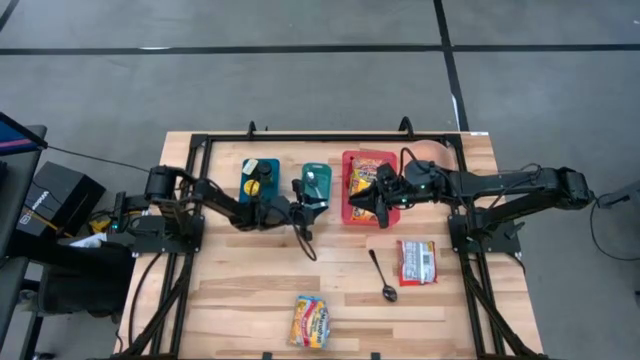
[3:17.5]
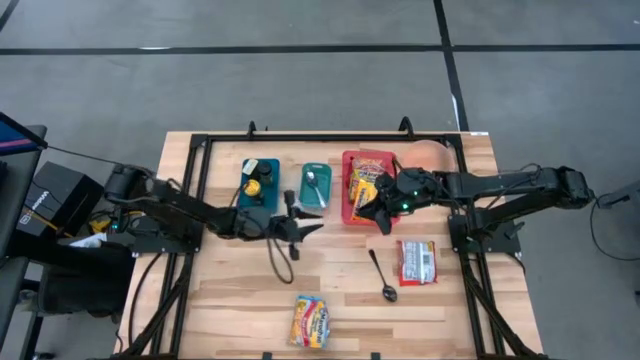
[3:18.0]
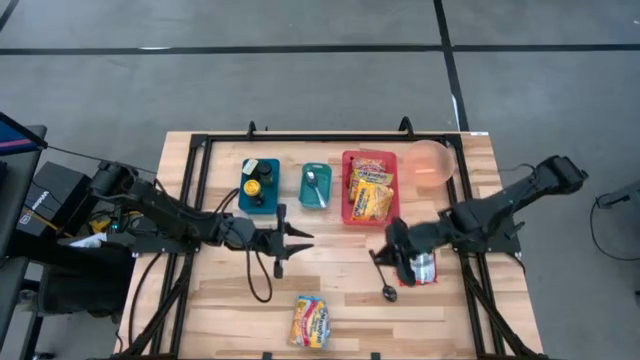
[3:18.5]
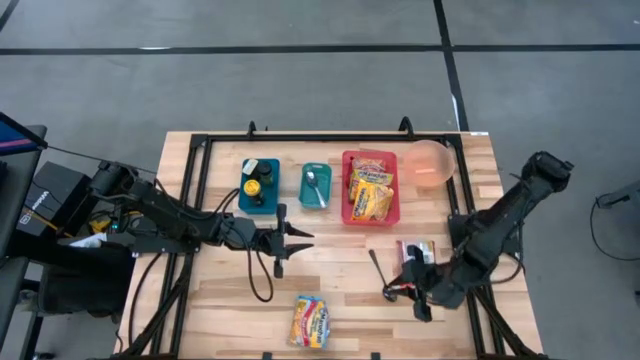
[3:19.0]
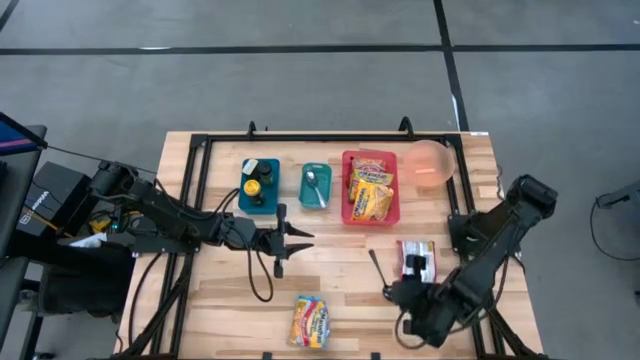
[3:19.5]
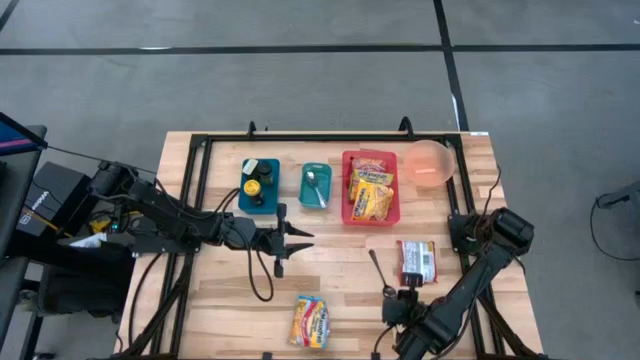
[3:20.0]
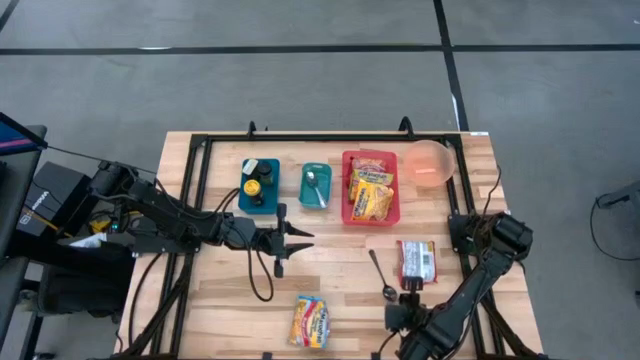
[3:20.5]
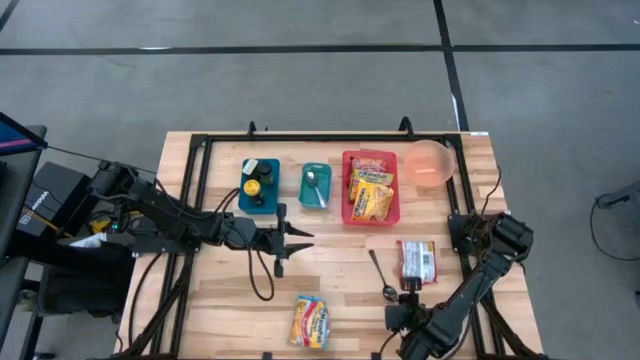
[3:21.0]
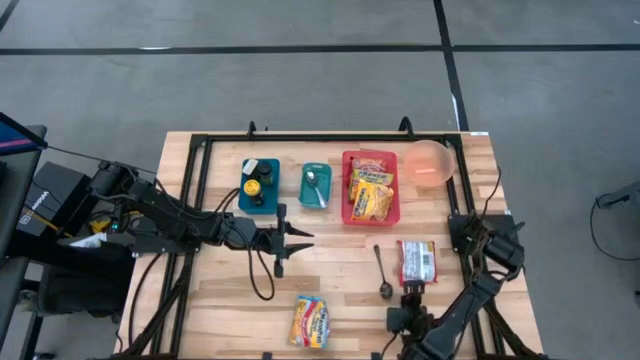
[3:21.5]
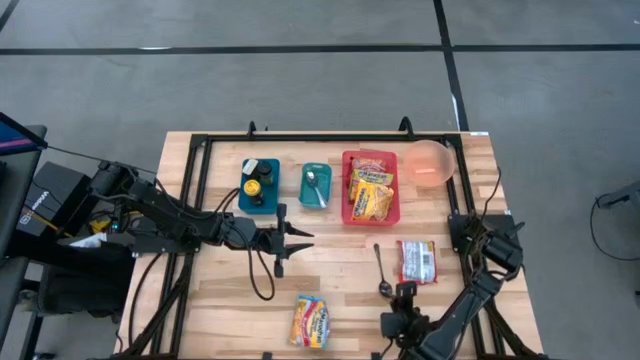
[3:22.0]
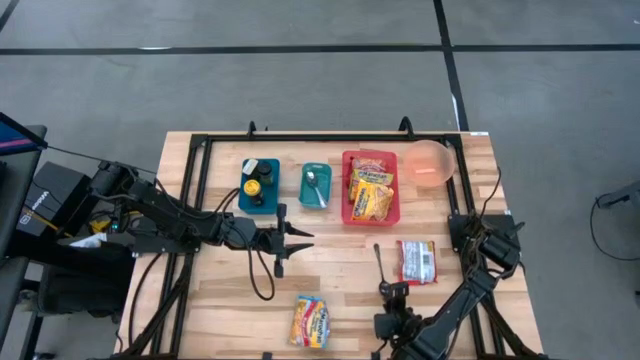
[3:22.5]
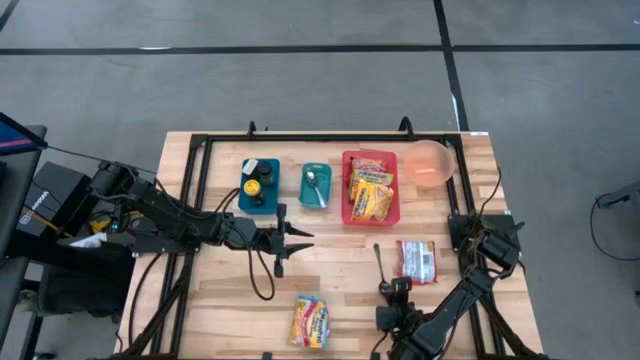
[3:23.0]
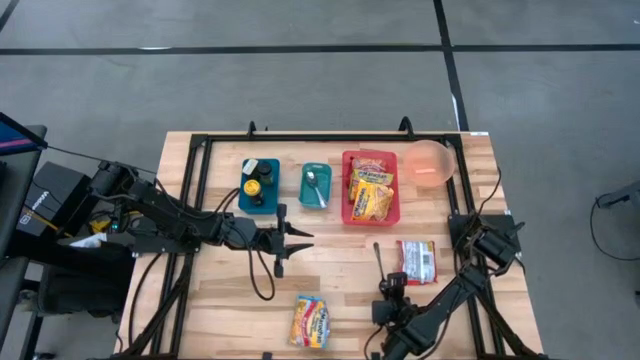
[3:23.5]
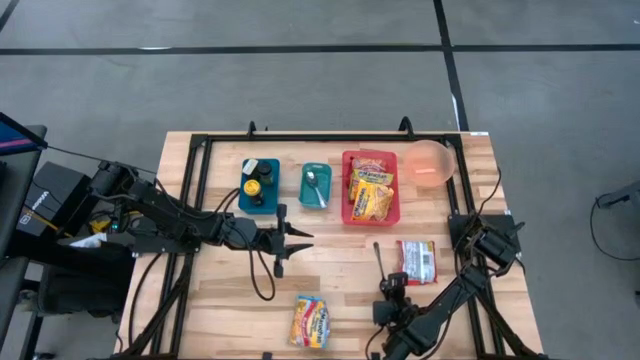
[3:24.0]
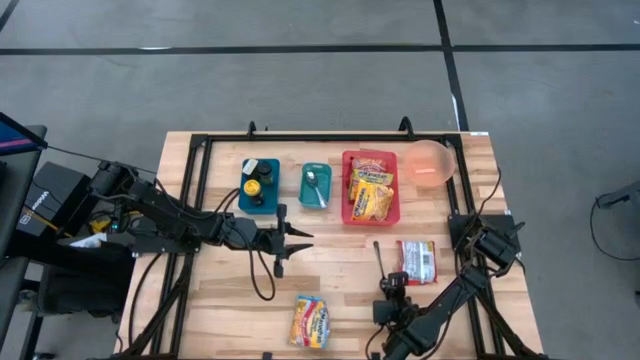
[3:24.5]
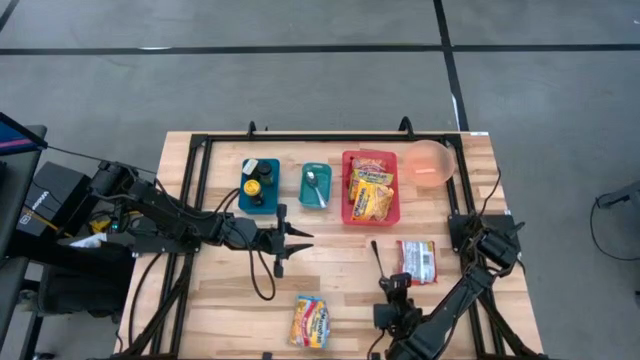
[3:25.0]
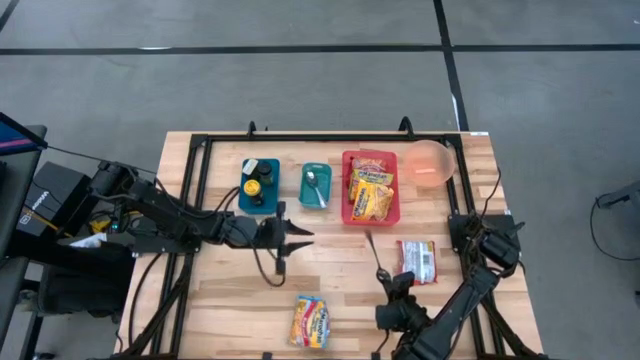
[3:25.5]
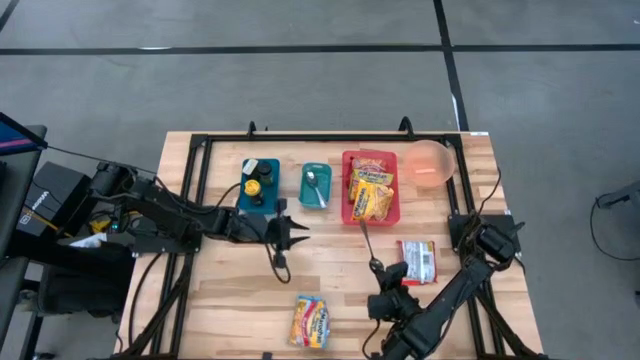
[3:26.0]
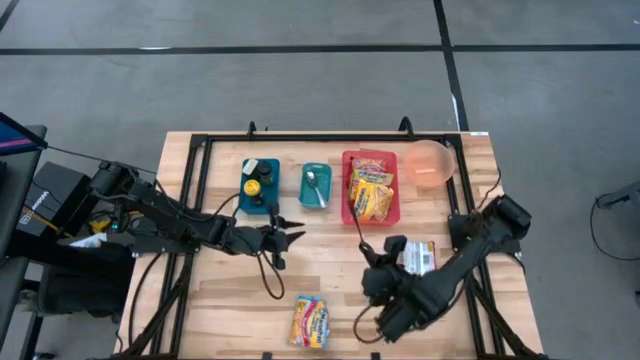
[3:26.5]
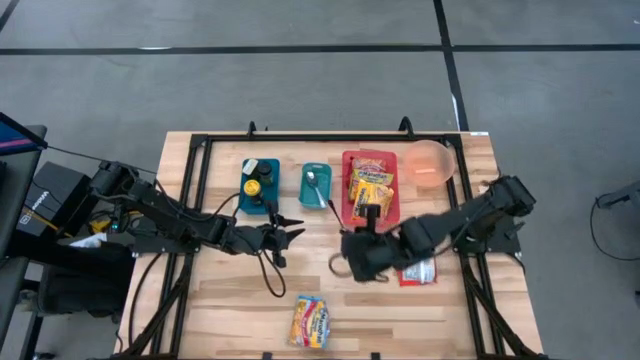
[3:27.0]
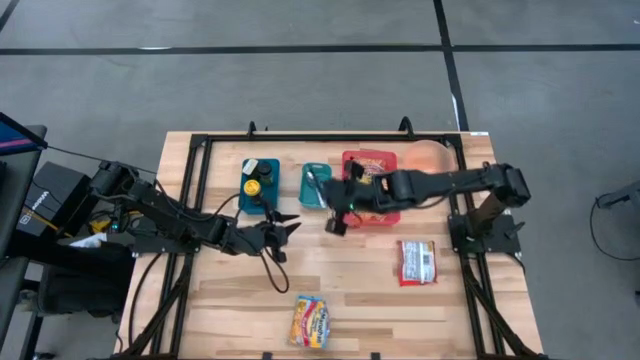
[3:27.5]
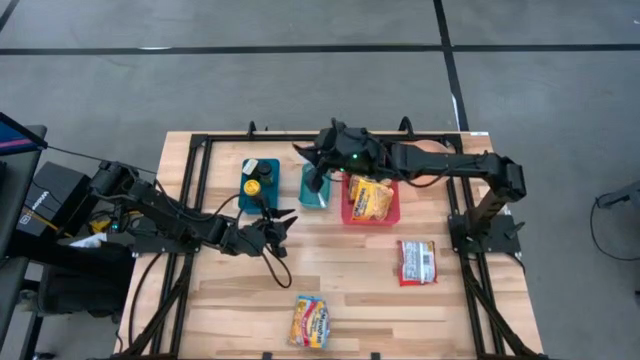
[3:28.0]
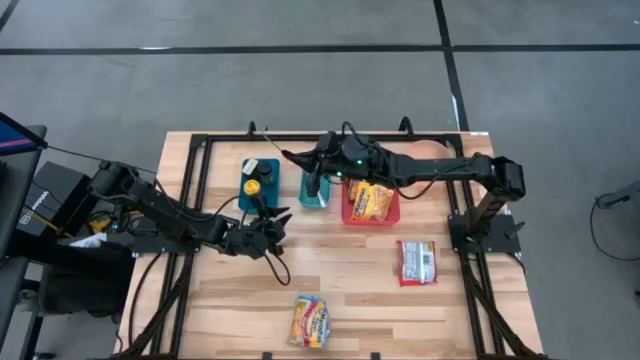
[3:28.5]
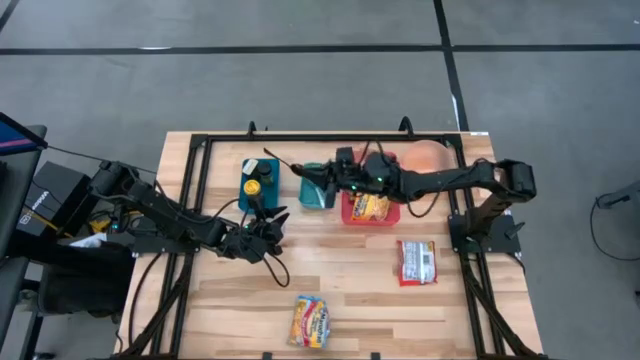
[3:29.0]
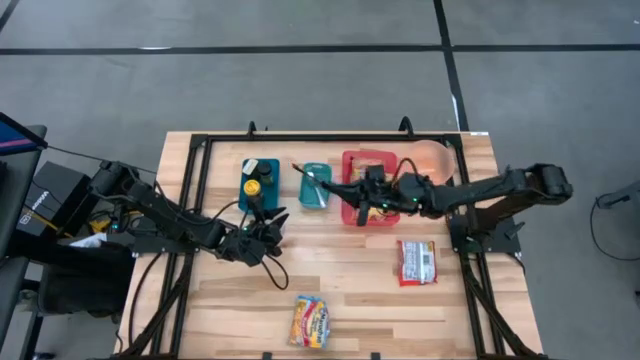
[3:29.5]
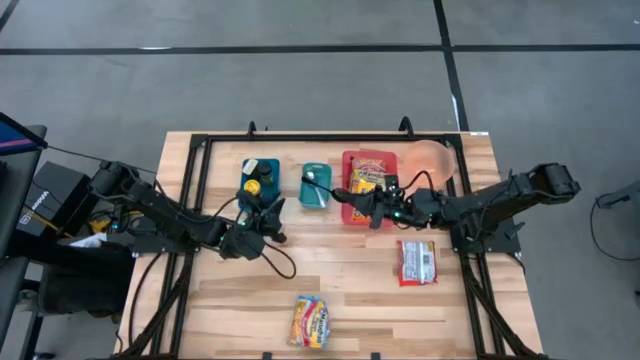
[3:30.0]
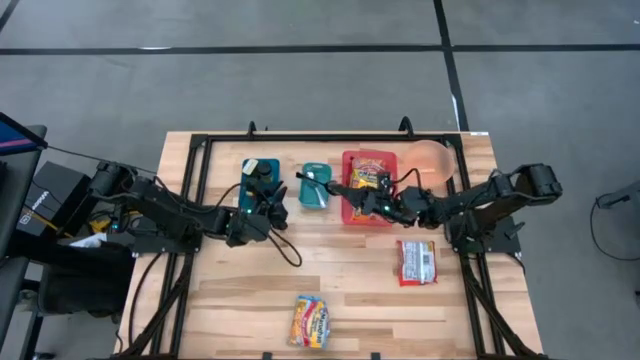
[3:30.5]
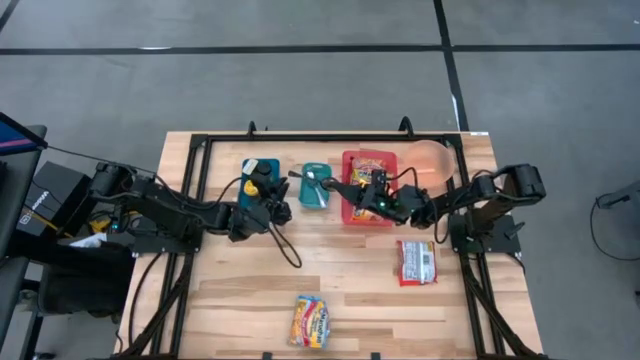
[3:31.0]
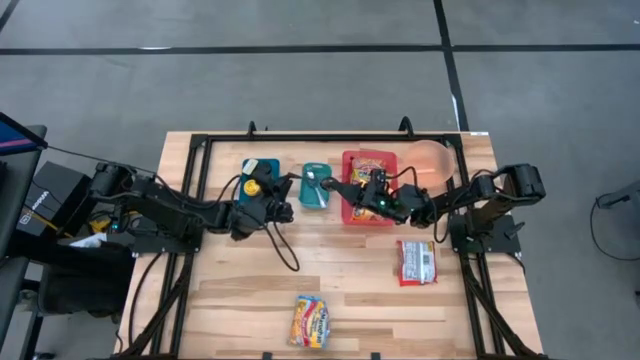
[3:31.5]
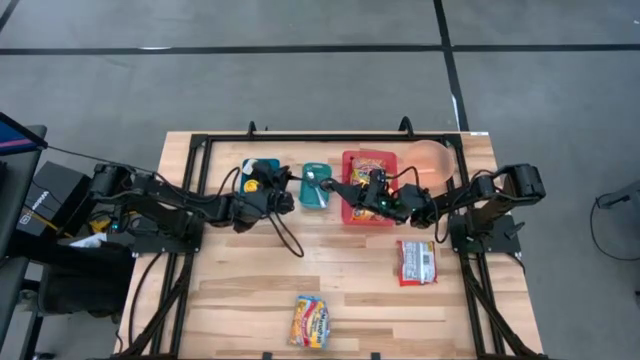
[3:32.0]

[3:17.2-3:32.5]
Task: Pick & Place Food Item
Put the black spoon into the green bin

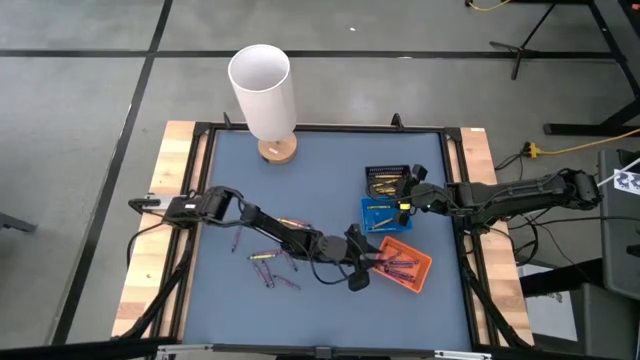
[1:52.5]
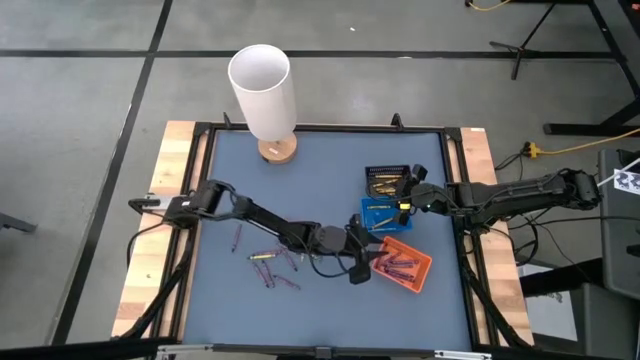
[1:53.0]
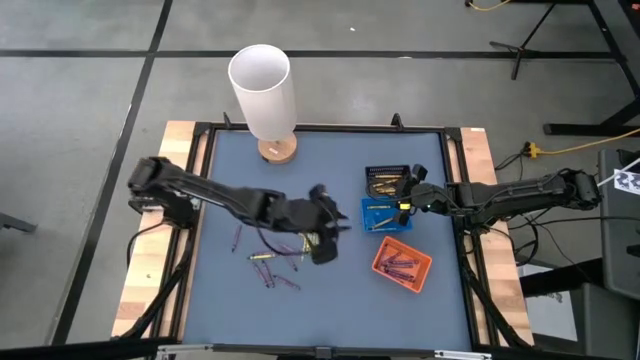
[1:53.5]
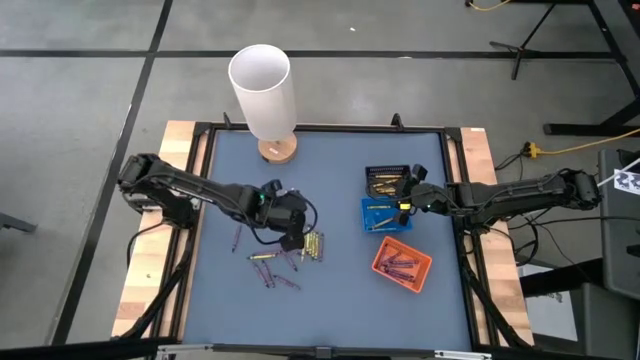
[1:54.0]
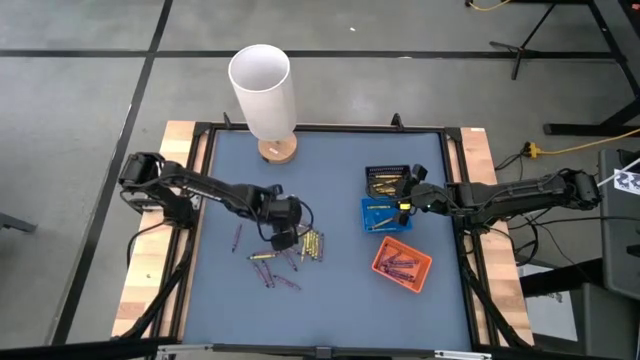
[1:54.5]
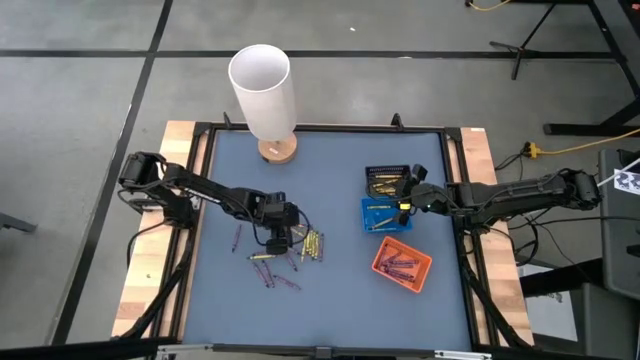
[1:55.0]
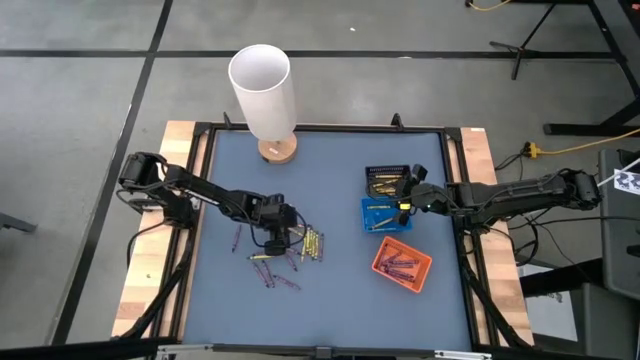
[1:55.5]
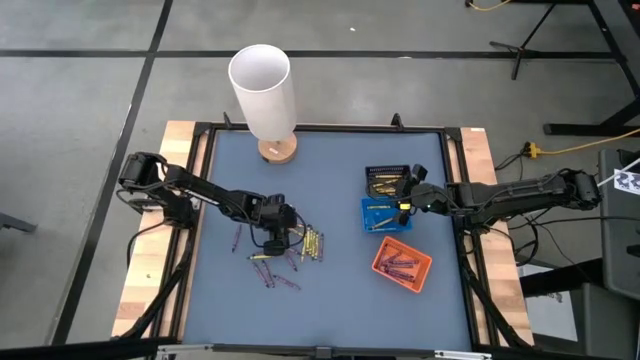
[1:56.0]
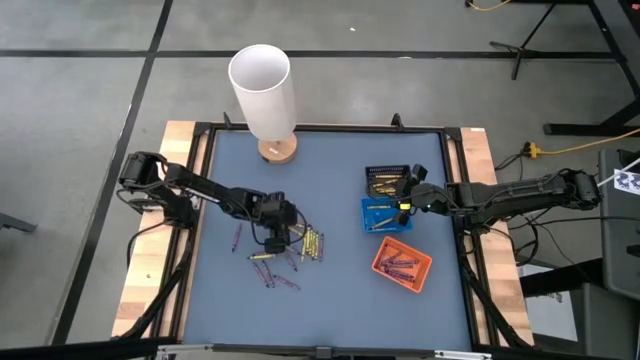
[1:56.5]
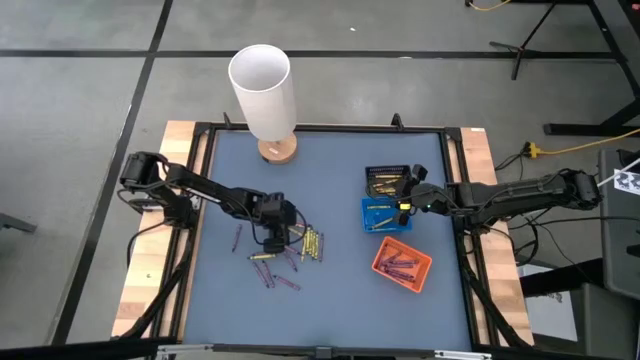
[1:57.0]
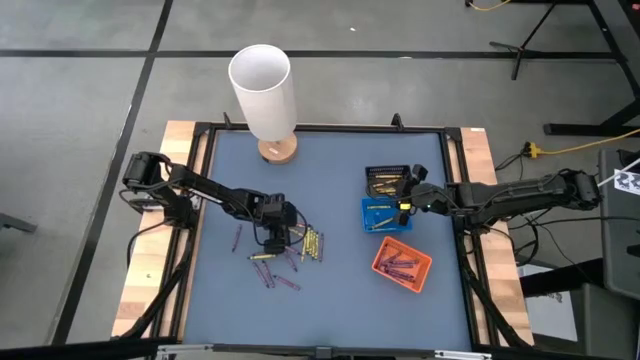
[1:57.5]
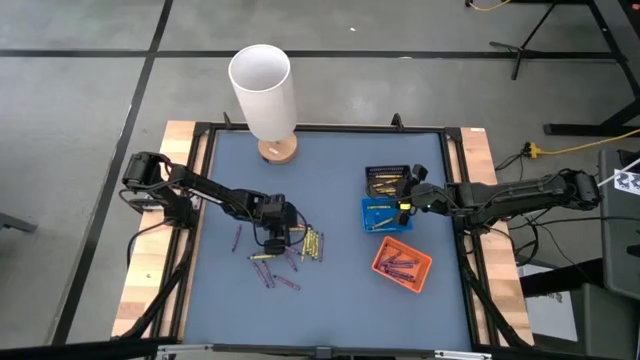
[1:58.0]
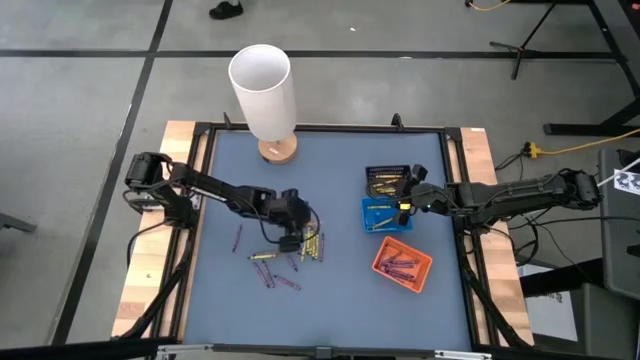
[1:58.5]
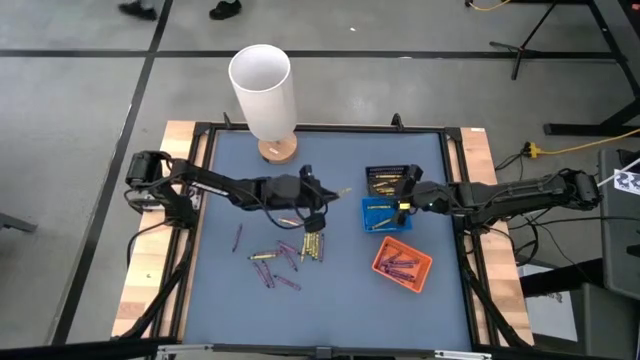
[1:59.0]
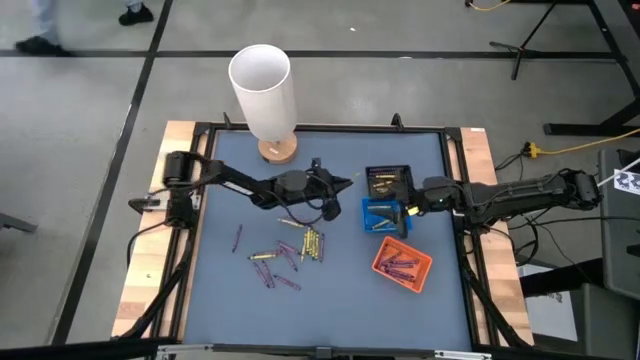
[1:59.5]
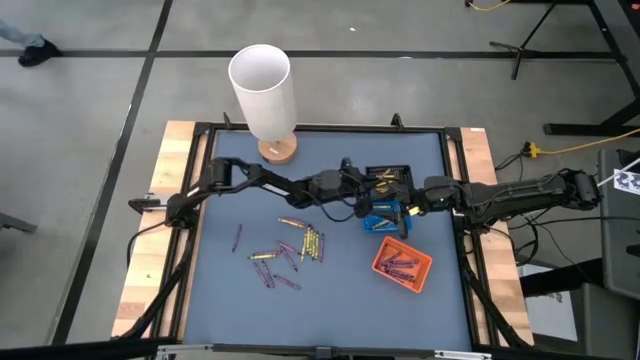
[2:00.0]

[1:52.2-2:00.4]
Task: Sort crayons
Put the yellow crayon into the black bin
